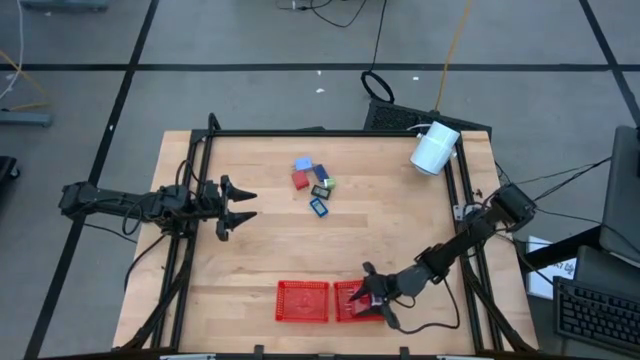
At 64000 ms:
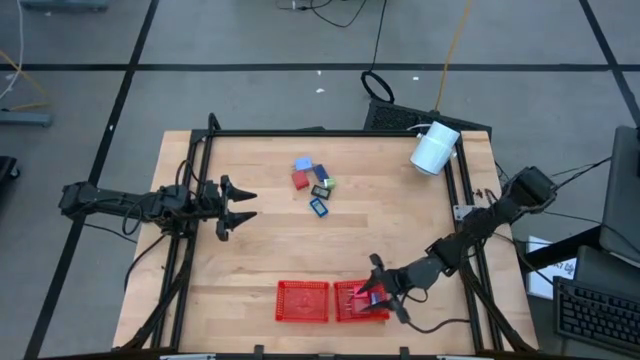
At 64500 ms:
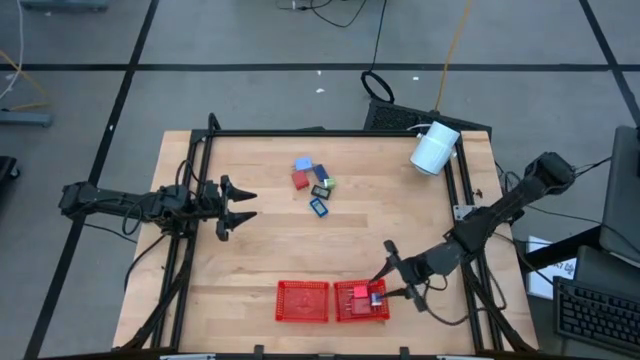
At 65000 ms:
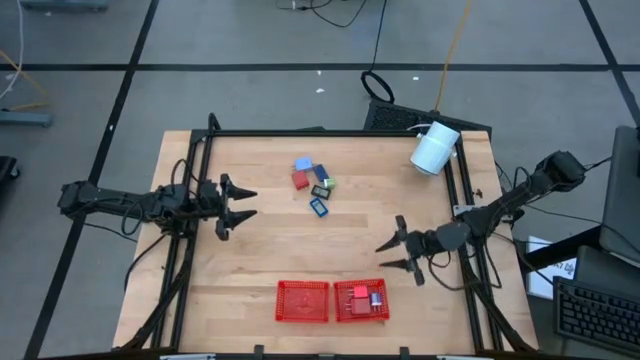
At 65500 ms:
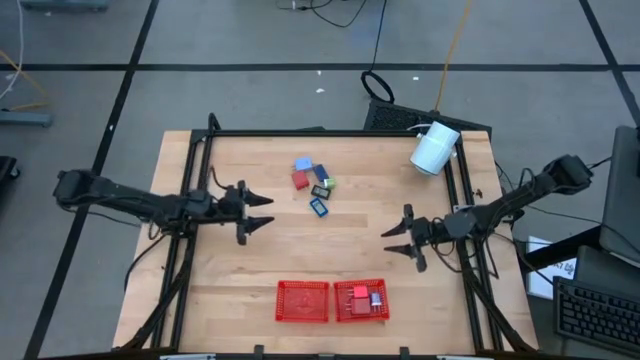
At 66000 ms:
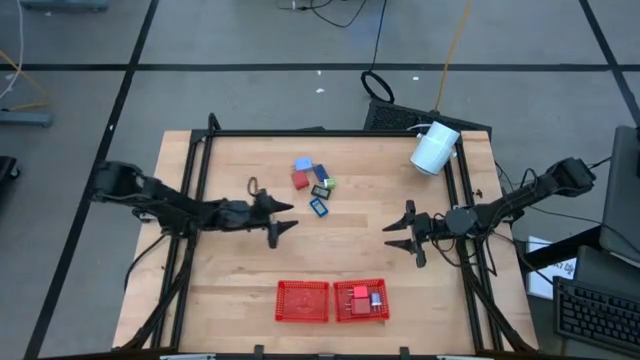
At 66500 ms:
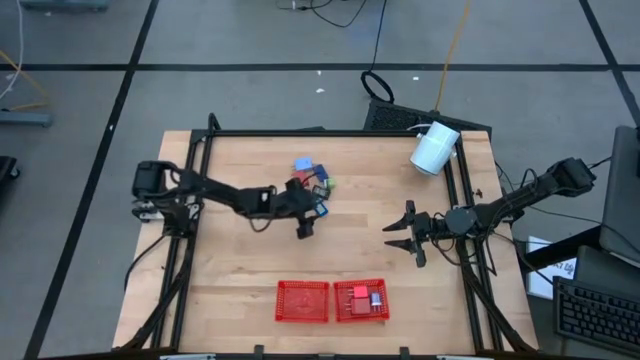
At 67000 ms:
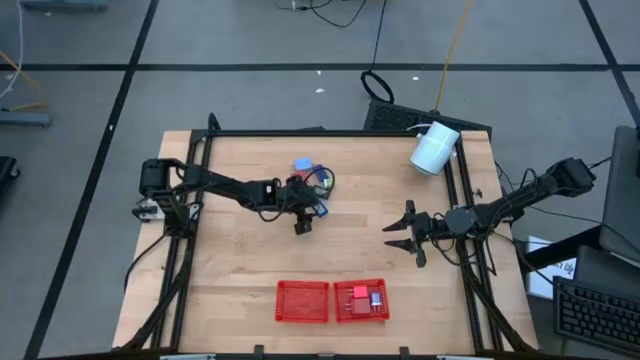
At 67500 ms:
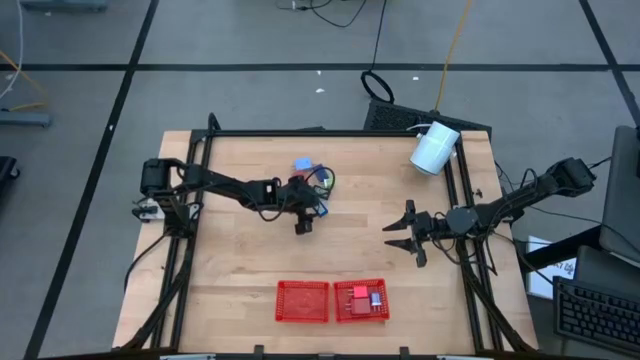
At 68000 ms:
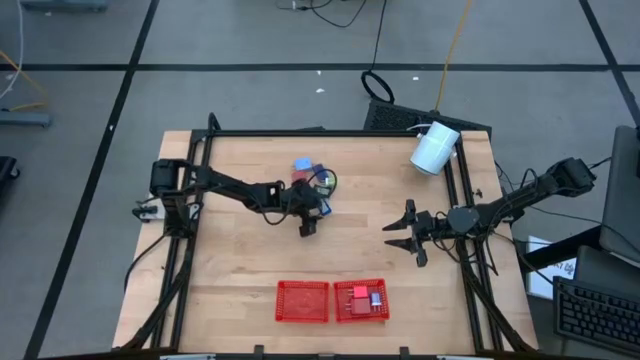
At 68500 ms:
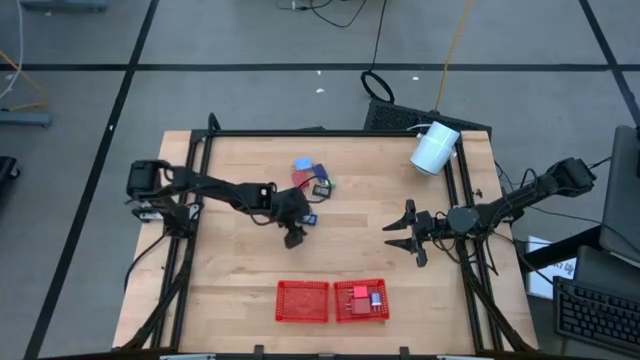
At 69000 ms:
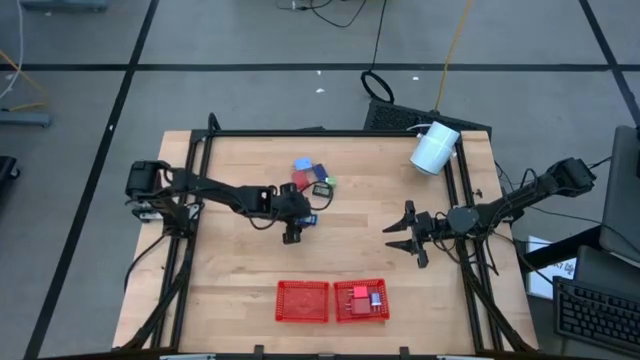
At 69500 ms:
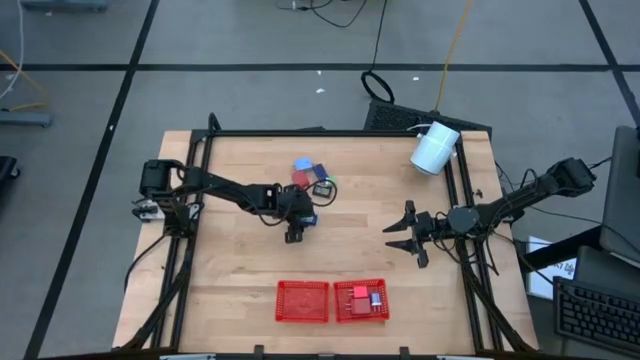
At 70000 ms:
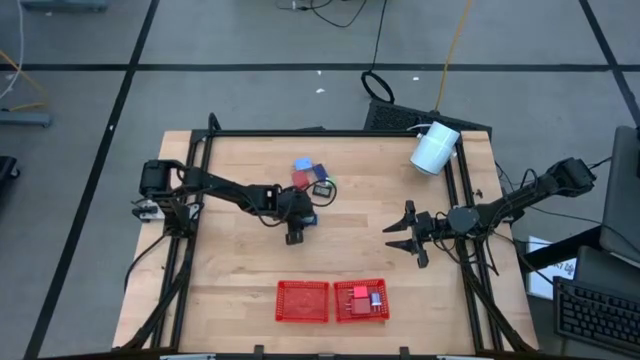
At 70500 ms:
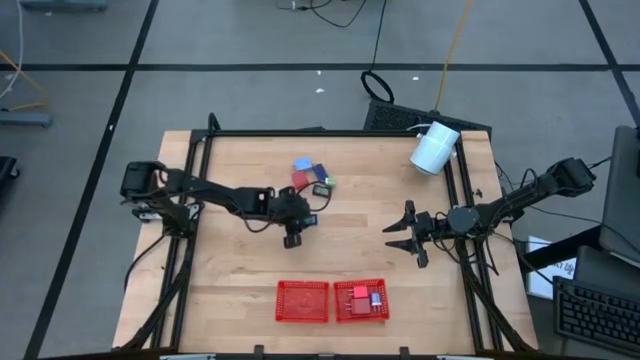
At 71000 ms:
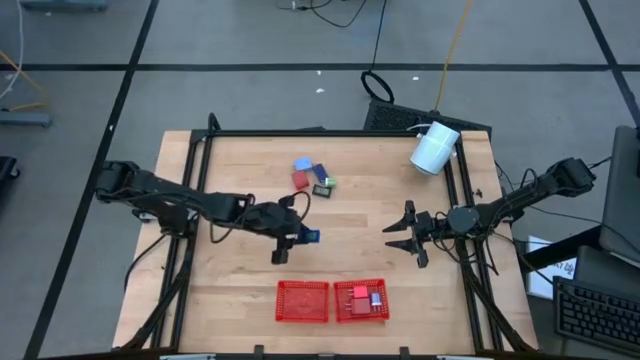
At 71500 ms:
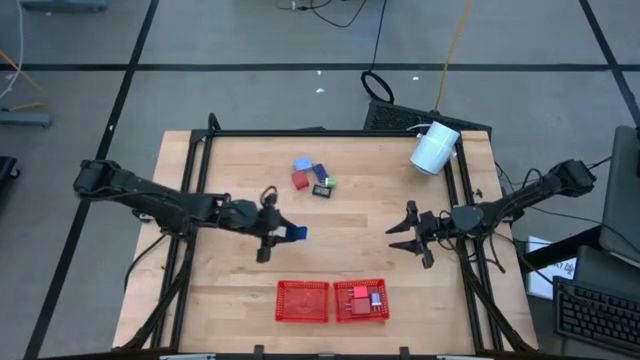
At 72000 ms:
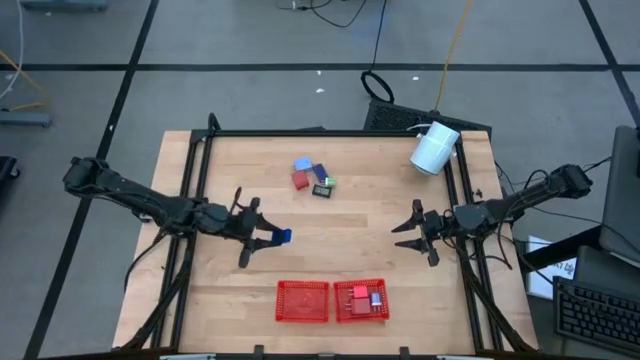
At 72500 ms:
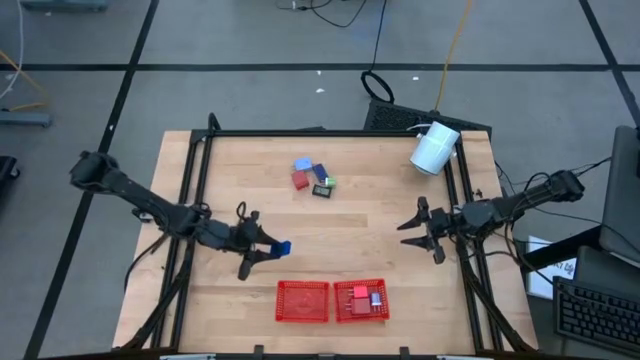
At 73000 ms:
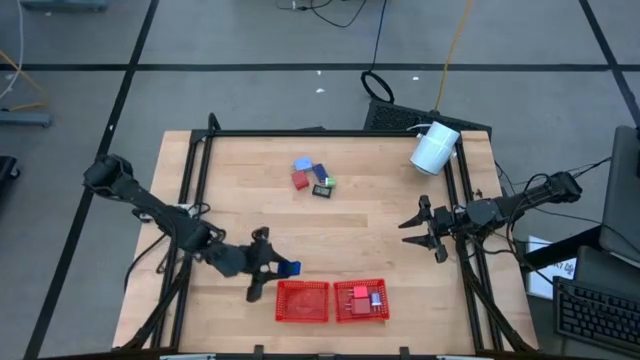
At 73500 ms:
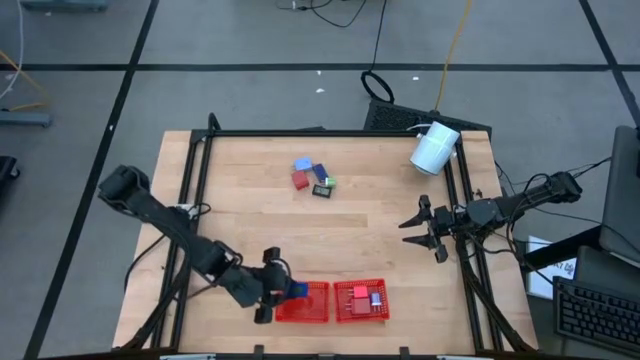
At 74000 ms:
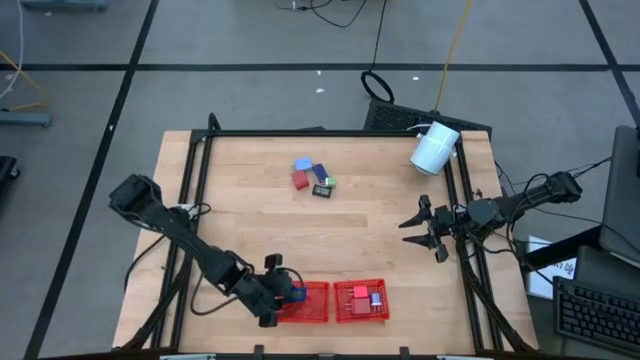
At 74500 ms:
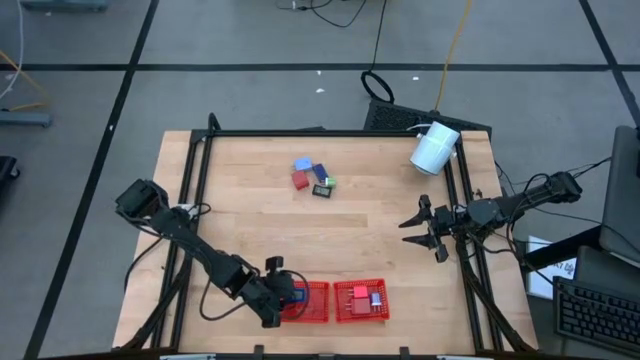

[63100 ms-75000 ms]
Task: Pick & Place Office items
Put the bottom blue digital timer into the left red bin

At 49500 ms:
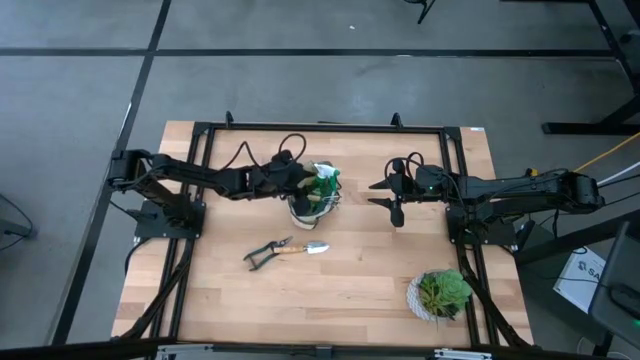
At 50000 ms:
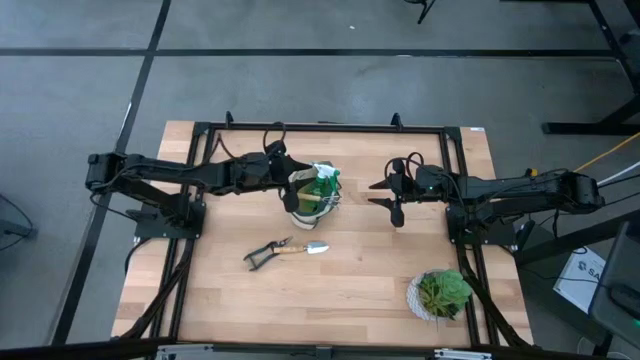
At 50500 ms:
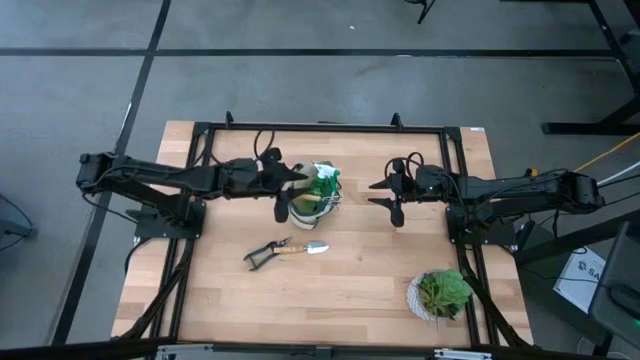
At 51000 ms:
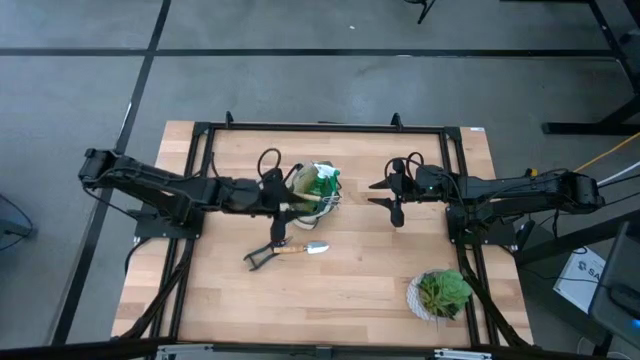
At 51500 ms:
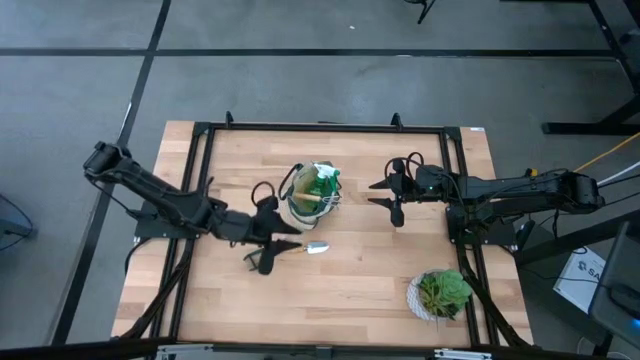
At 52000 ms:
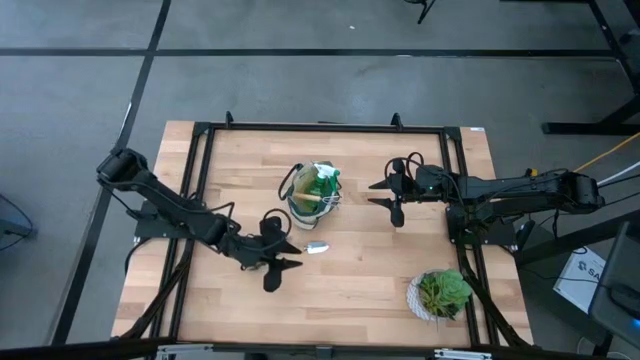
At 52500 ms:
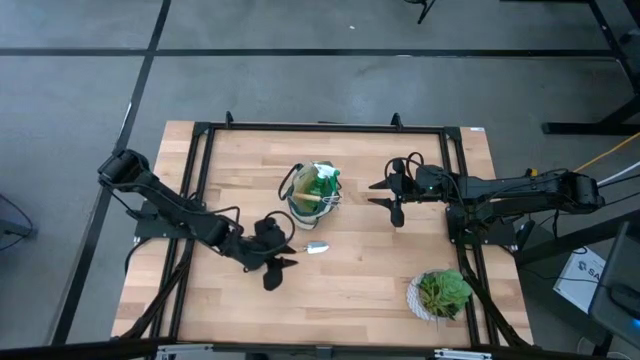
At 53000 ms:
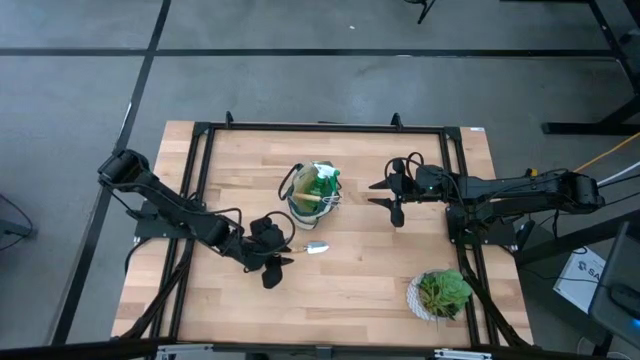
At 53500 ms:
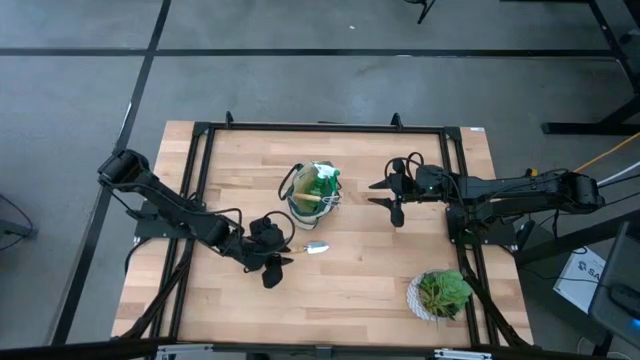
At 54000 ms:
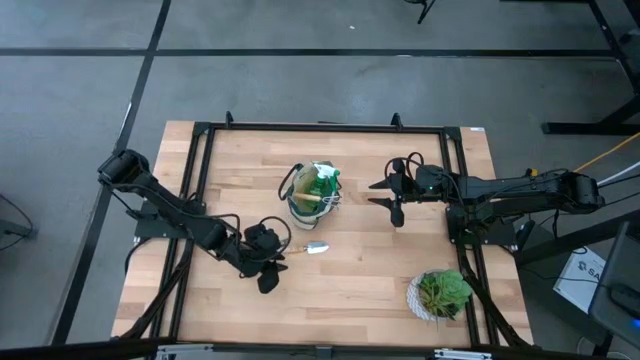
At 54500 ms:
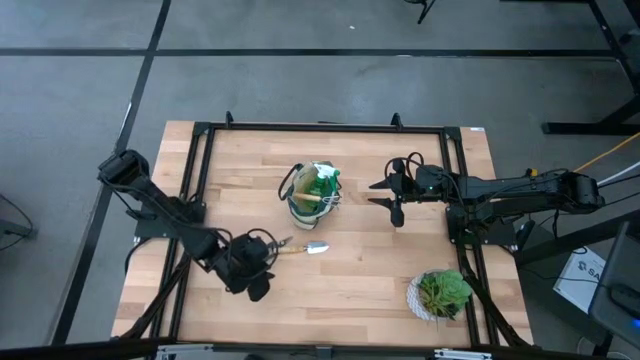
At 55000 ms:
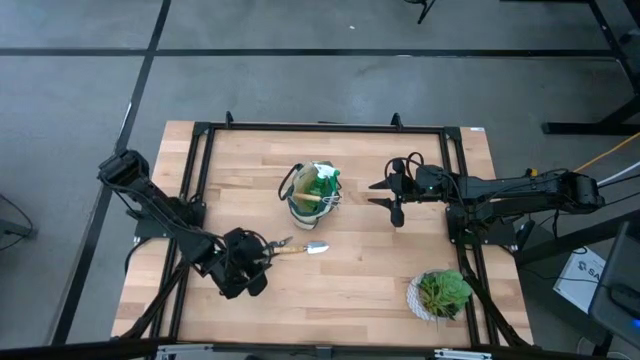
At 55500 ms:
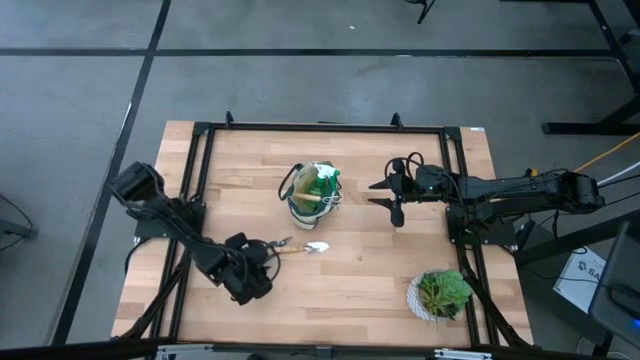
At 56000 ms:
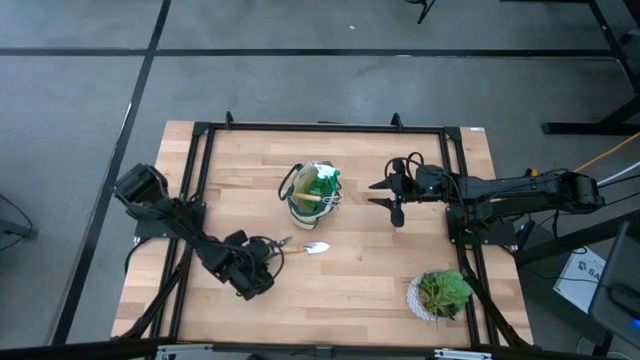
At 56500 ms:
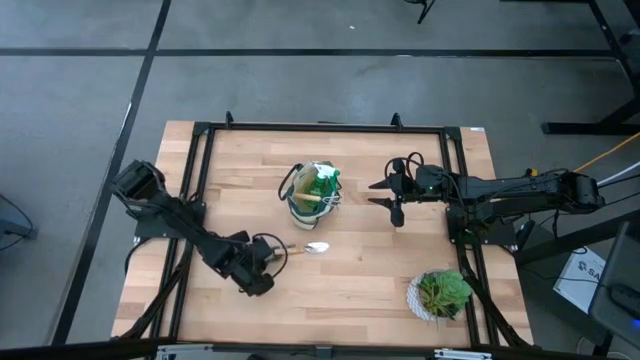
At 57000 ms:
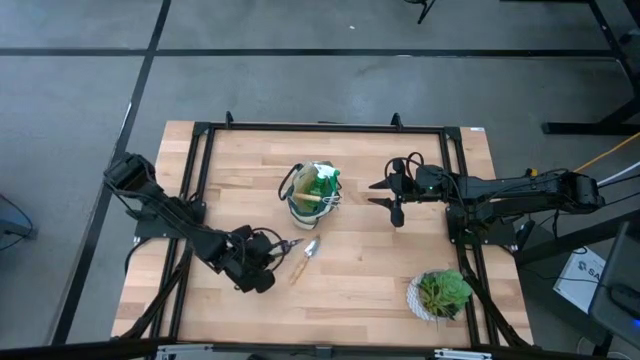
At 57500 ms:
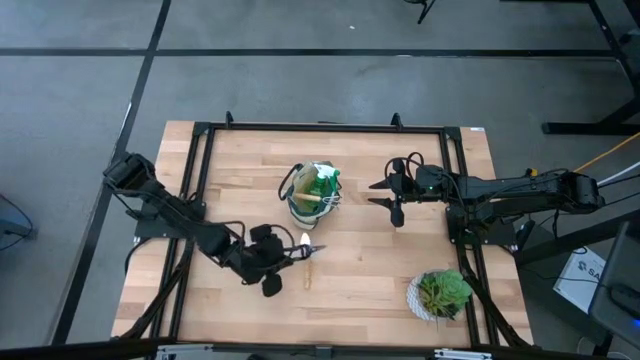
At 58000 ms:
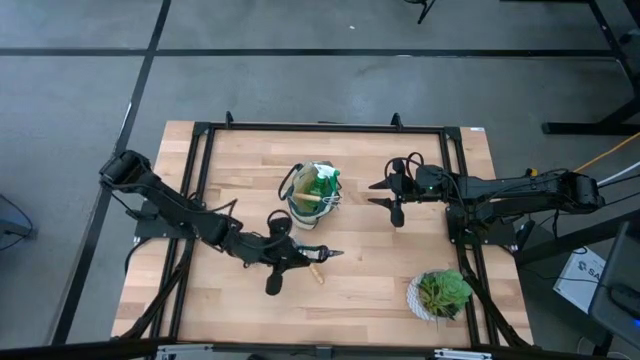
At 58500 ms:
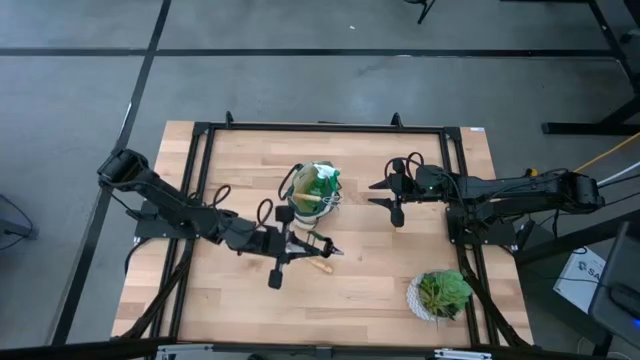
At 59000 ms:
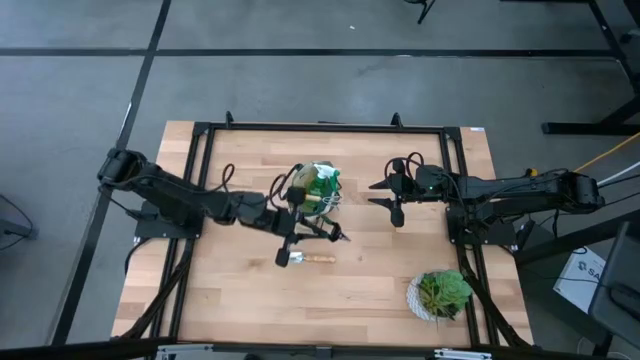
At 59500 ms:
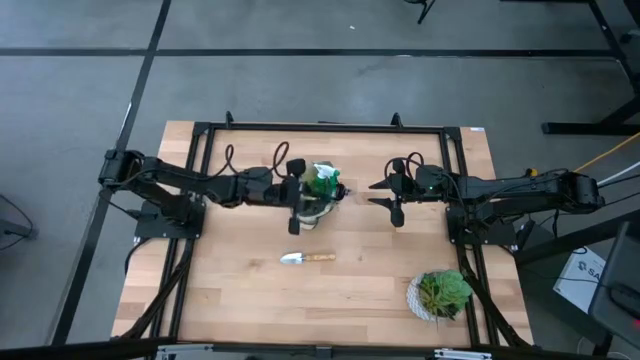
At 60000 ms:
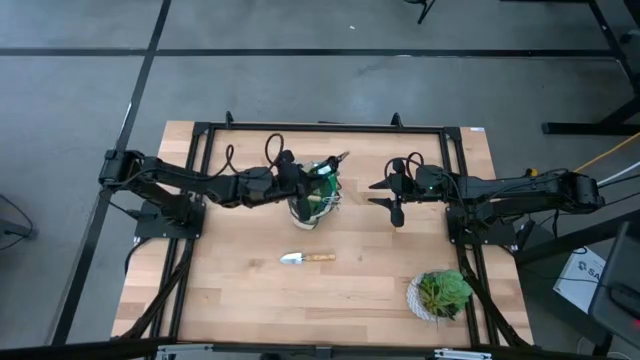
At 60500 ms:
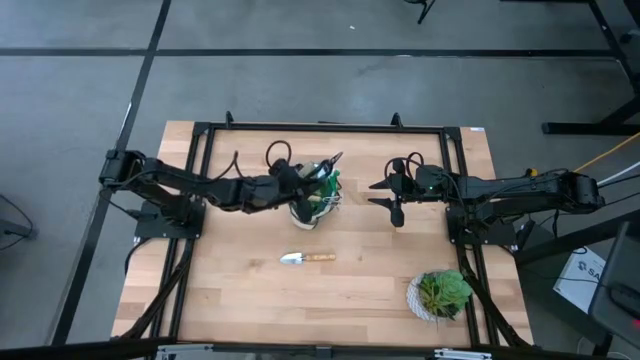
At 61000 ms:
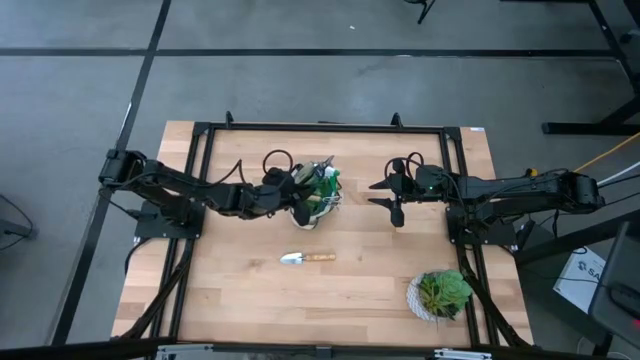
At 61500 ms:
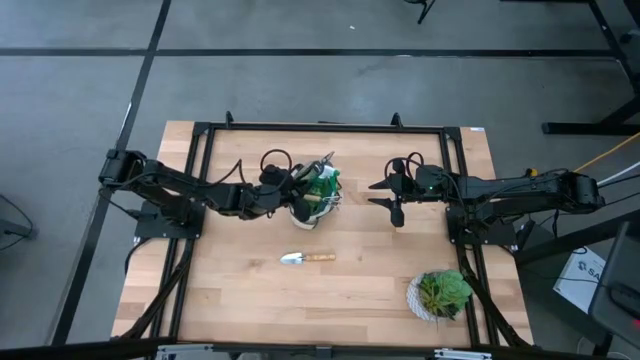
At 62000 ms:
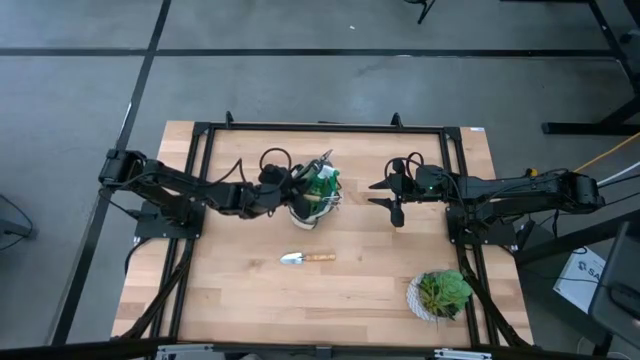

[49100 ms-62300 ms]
Task: Pick & Place Garden tools in Gardening bag
Put the green shear scissors into the gardening bag
